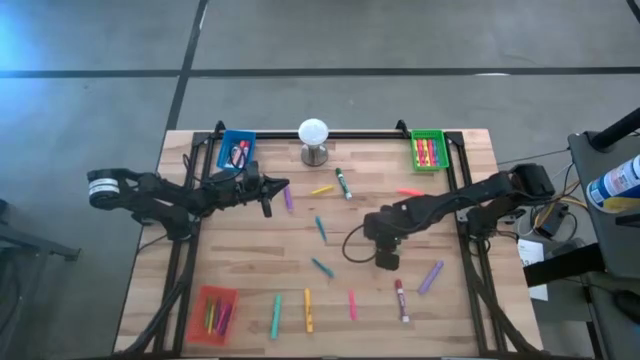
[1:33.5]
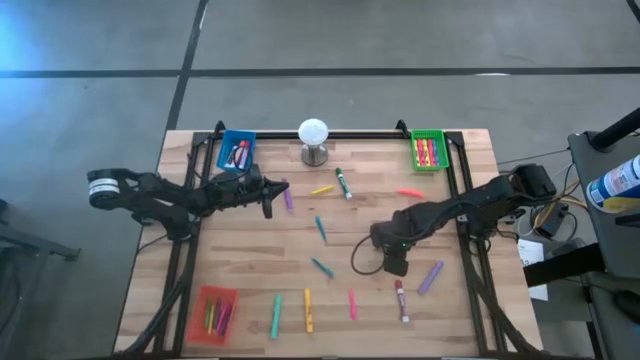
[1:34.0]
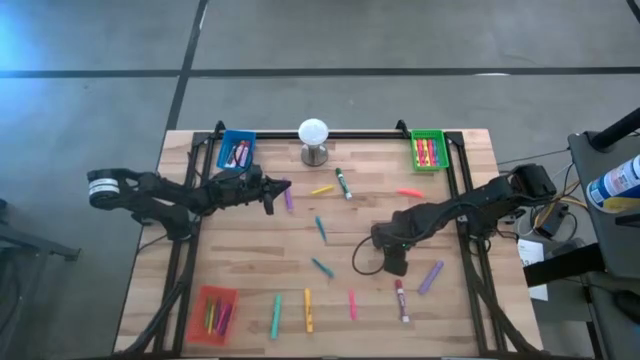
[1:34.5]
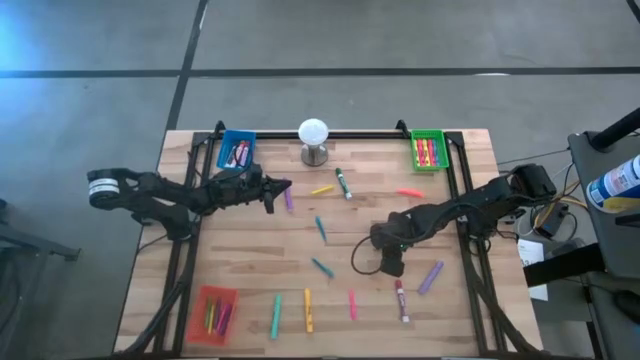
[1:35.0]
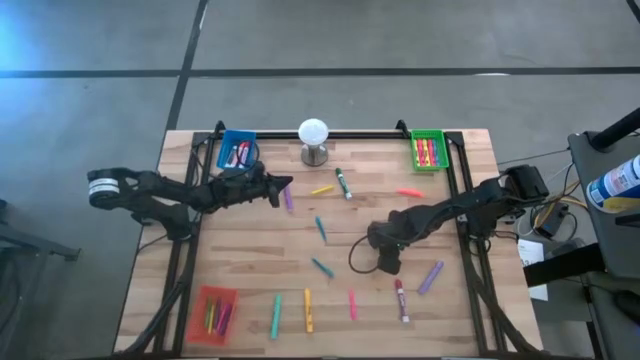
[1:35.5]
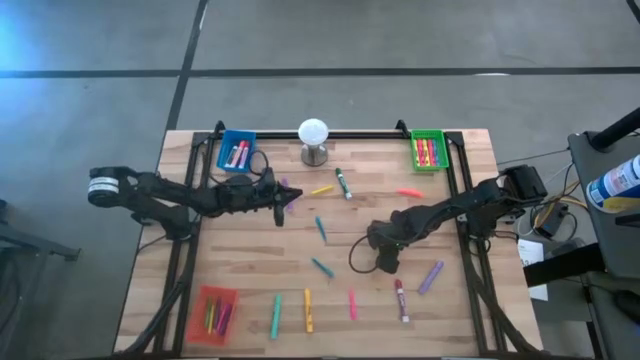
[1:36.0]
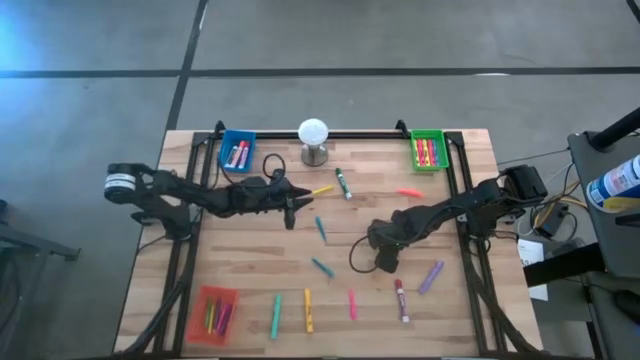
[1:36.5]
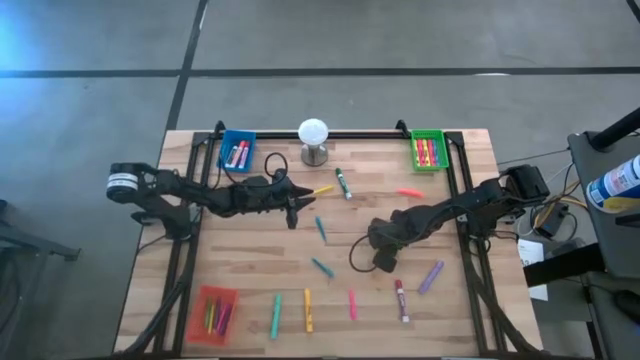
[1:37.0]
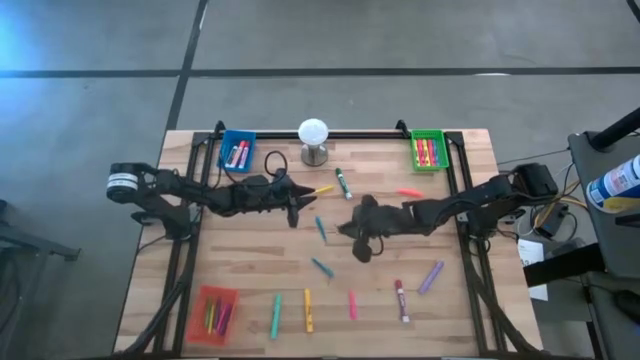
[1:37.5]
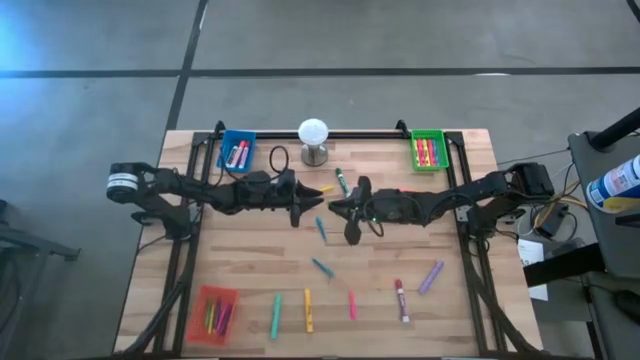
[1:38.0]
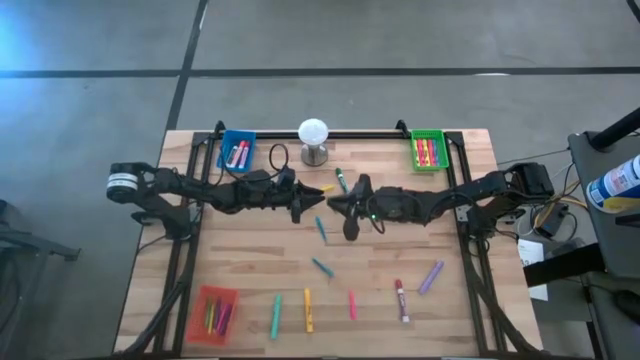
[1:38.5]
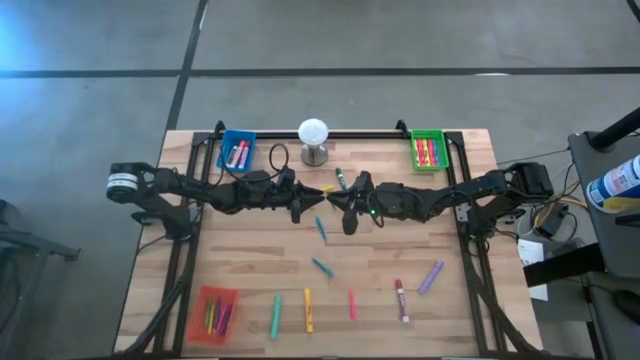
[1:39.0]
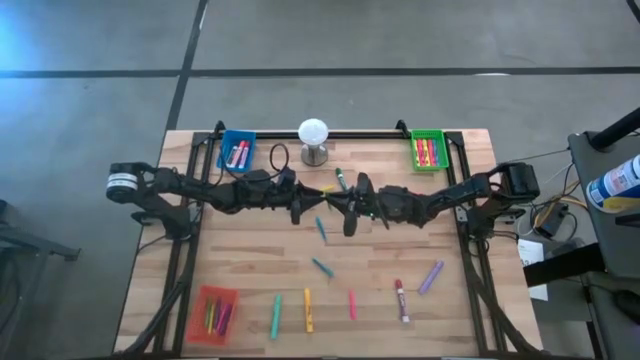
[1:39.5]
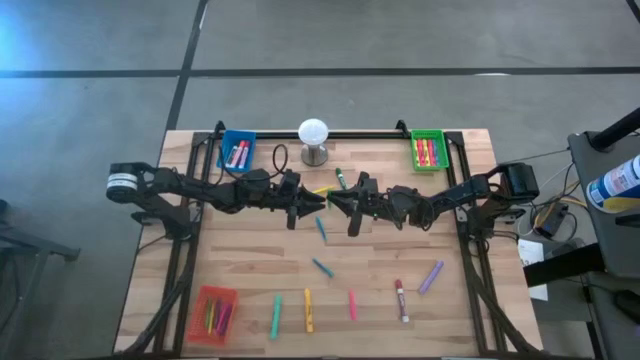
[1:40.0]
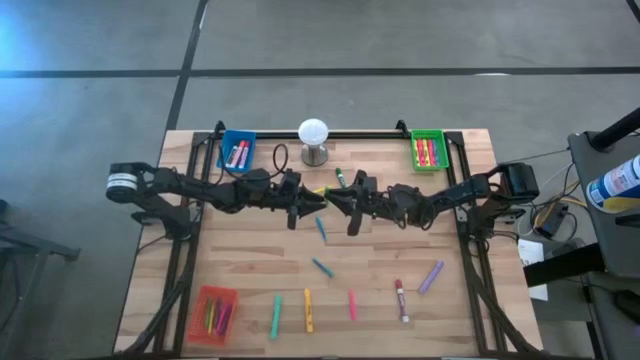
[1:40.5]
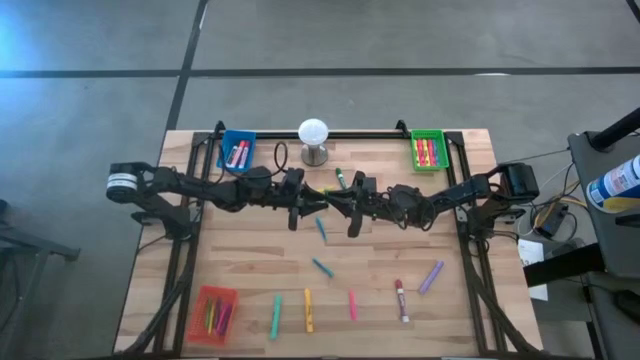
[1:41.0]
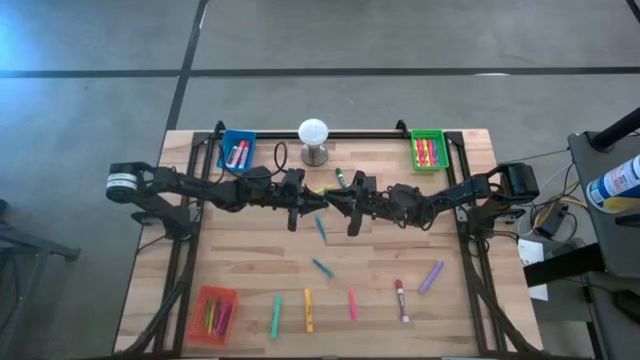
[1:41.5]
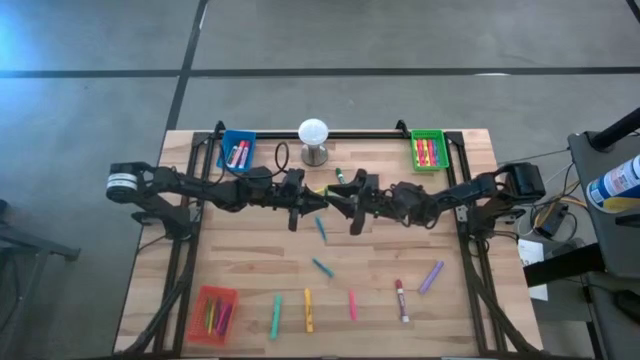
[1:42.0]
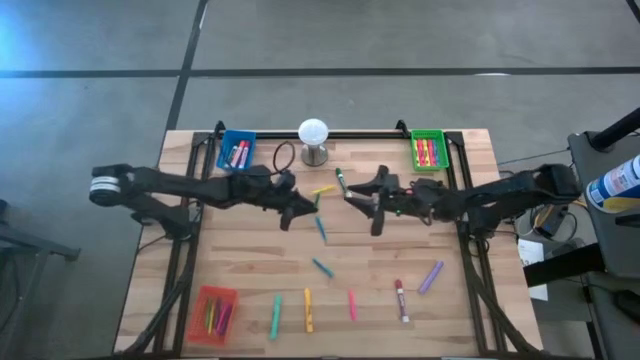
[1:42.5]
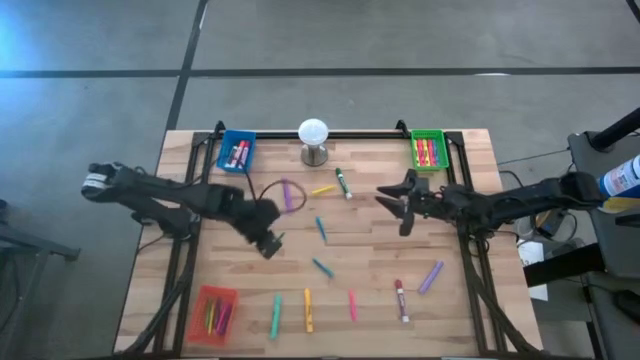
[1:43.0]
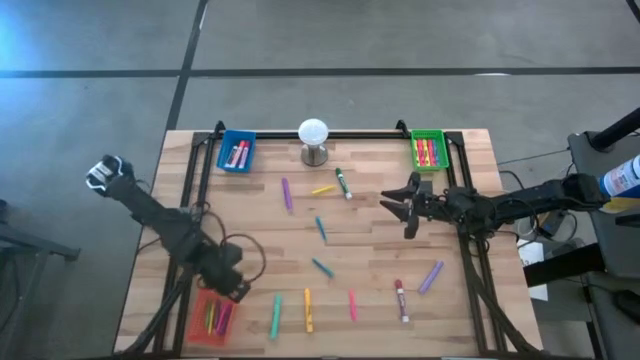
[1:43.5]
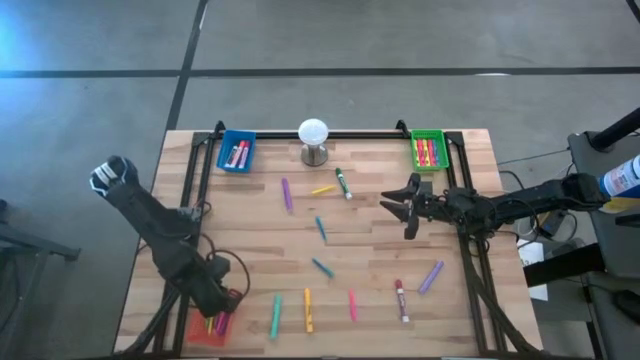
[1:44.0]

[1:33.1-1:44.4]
Task: Pick & Place Markers
Put the green pen into the orange bin

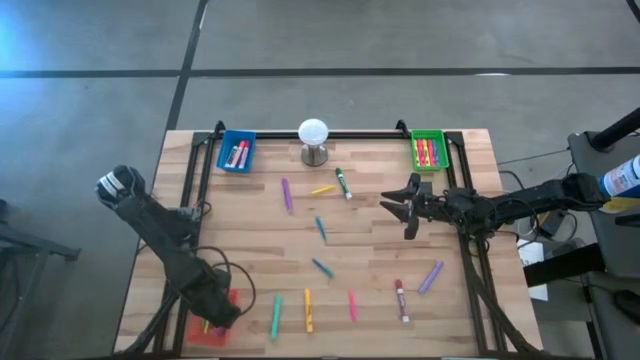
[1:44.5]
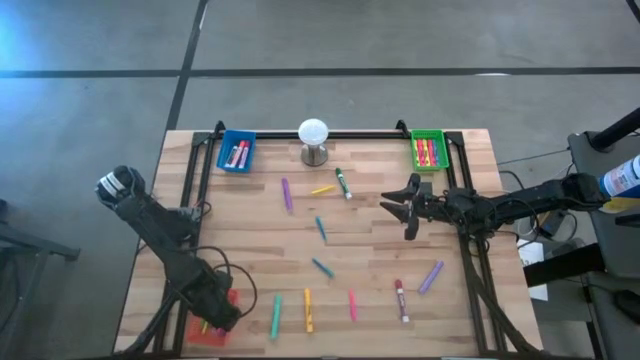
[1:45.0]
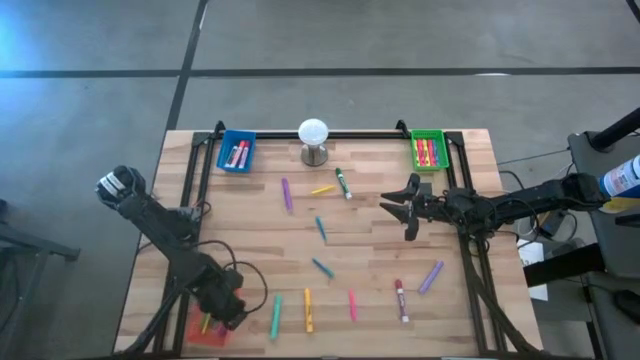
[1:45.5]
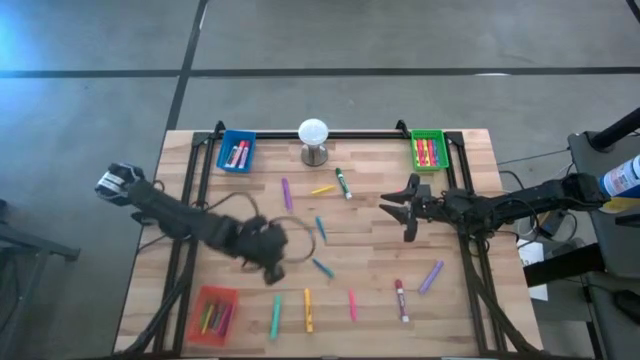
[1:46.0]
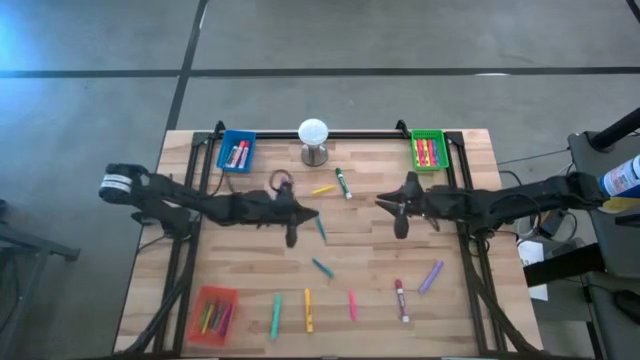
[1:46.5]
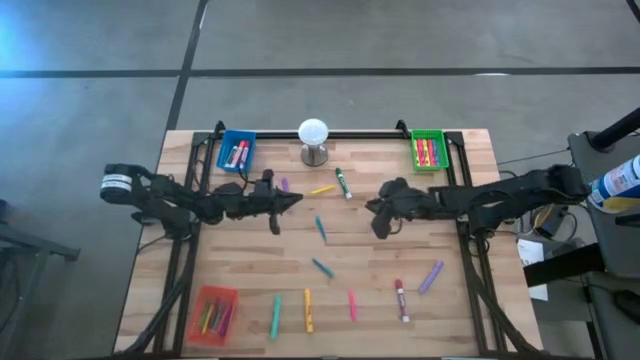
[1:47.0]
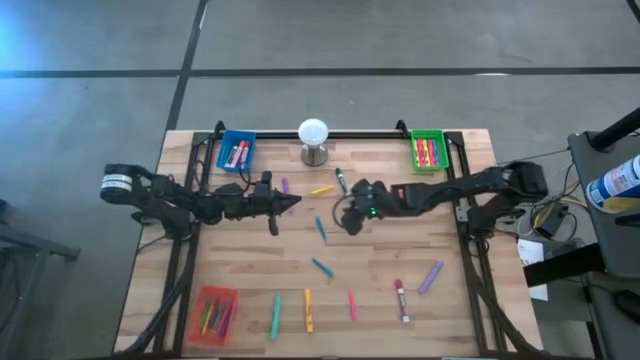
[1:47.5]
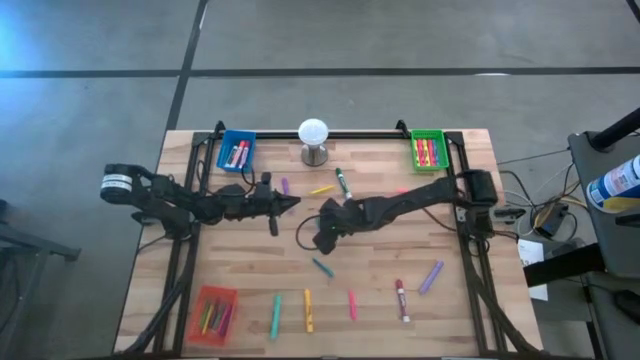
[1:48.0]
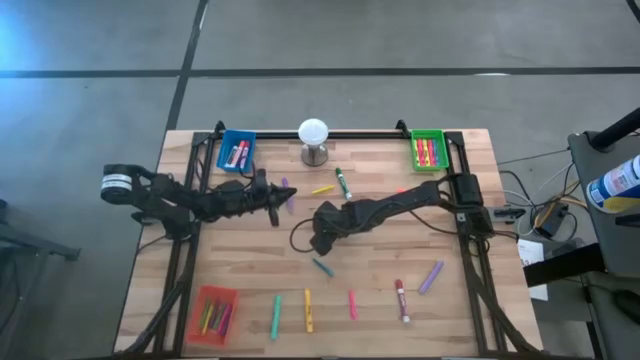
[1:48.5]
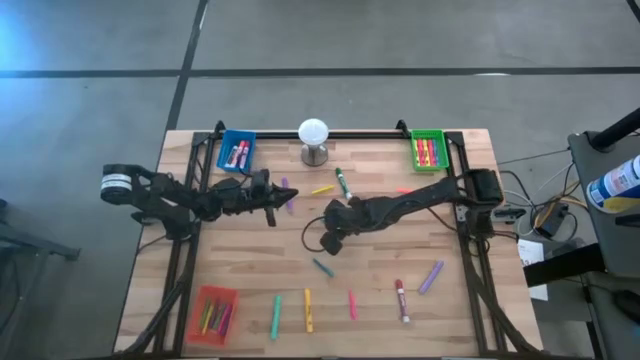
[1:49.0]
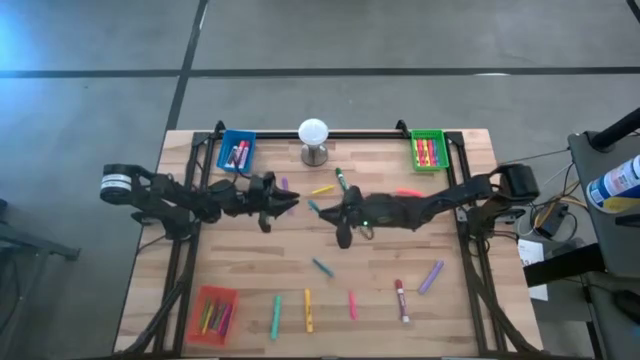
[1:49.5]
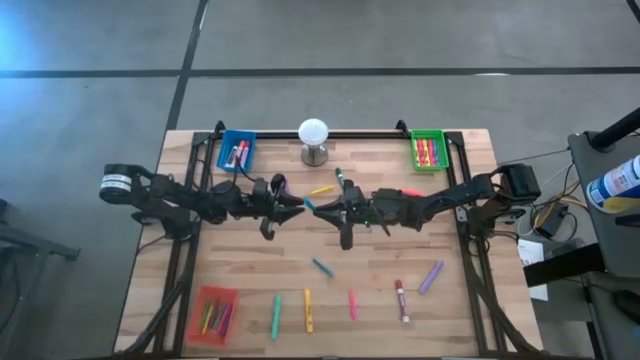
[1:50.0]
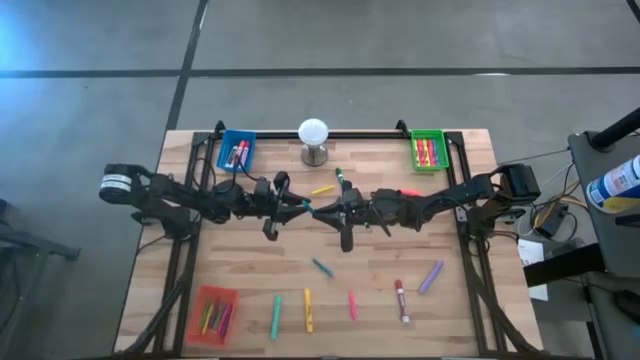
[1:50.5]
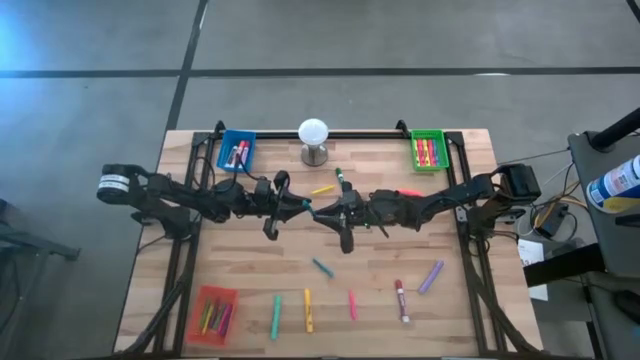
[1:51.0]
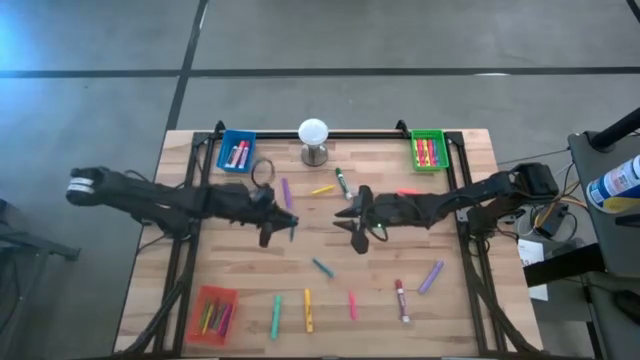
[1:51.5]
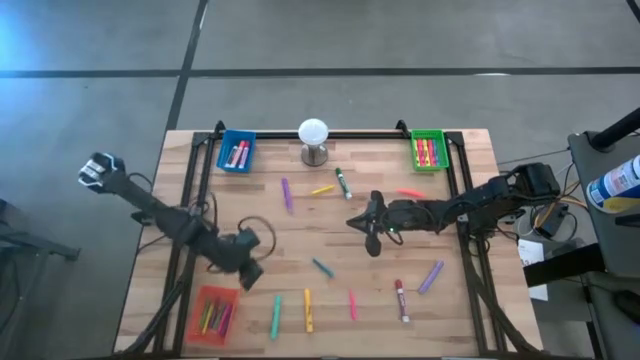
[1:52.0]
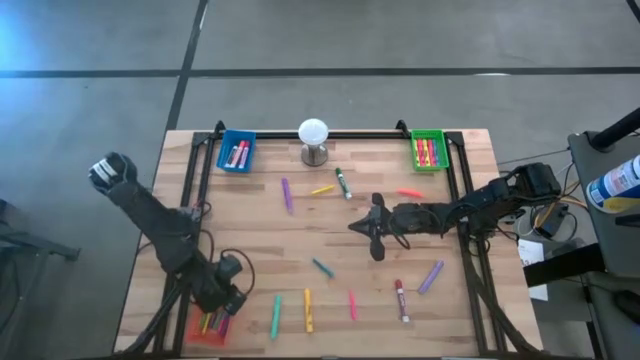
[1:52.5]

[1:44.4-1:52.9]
Put the top blue pen into the orange bin

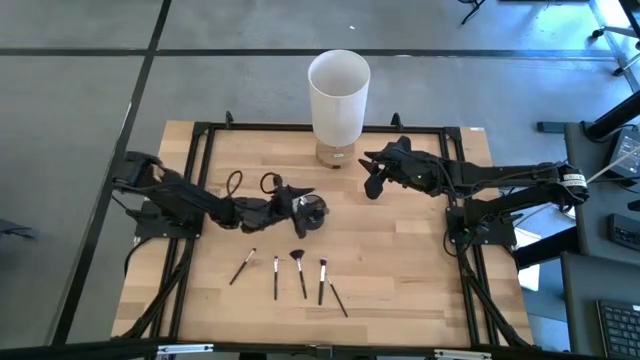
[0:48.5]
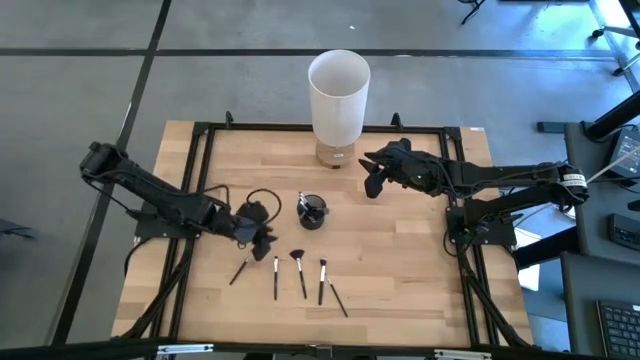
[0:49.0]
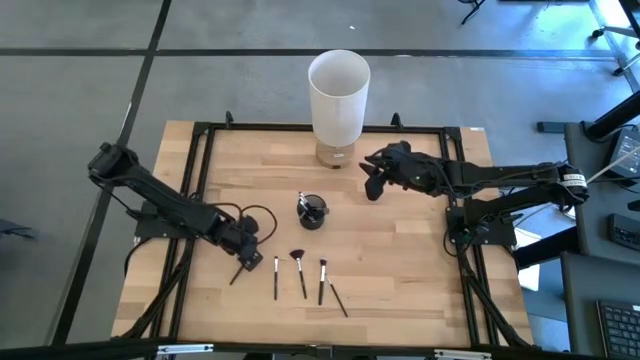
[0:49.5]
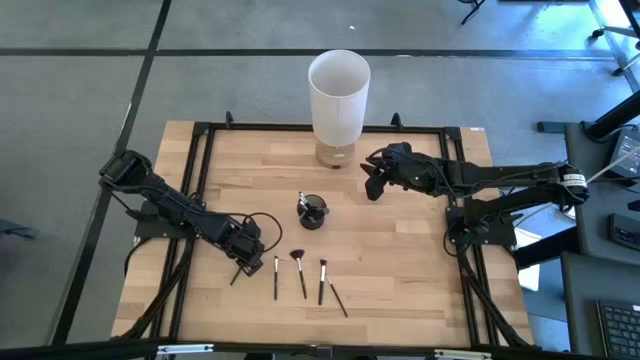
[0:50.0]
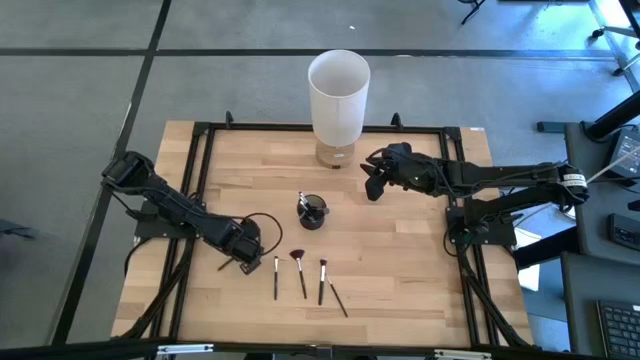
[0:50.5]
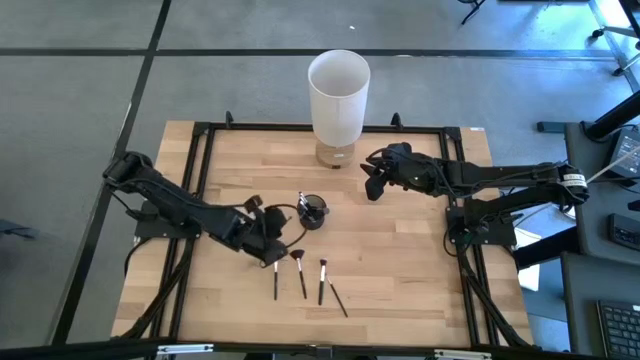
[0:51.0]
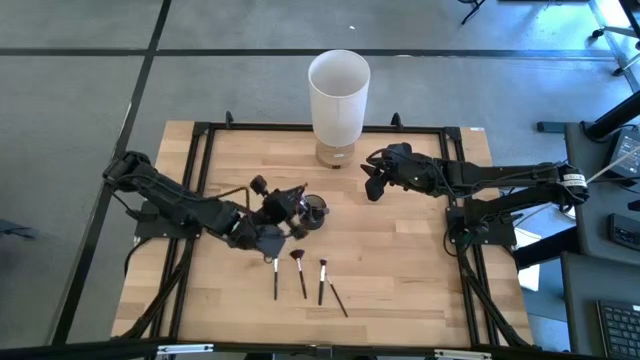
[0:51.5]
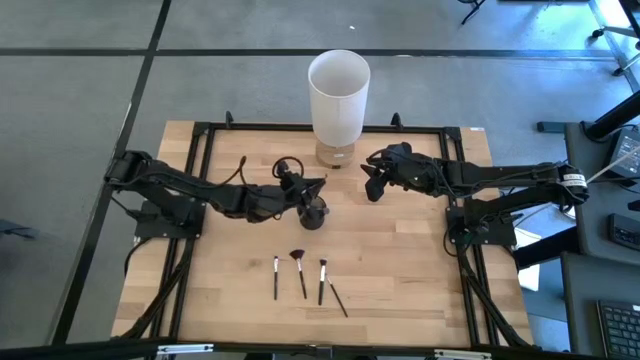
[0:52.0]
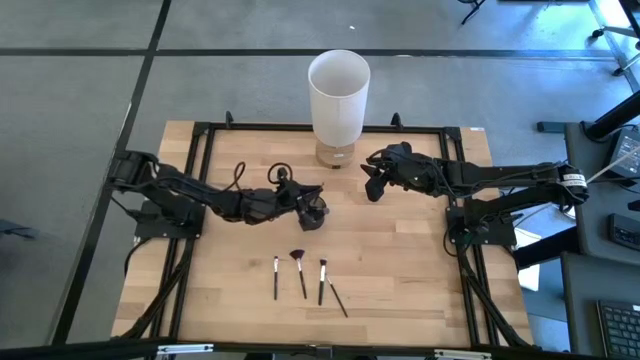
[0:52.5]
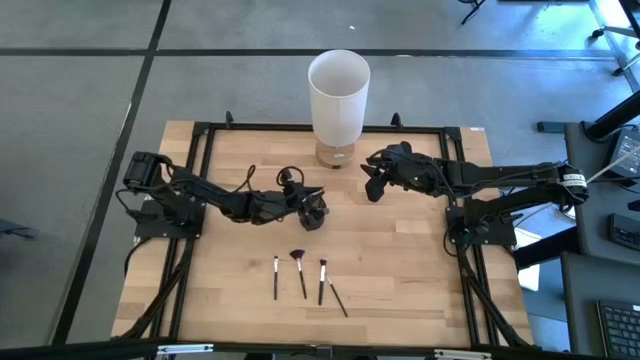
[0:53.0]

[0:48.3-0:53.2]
Task: Put items in baskets/containers
Put the black eyeshadow brush into the black pen holder
